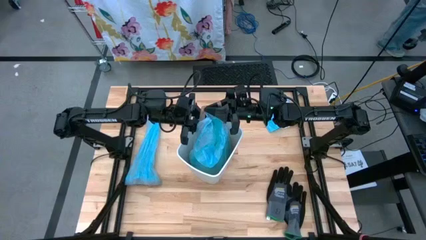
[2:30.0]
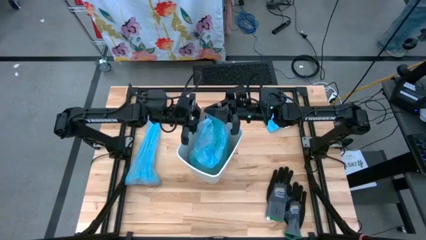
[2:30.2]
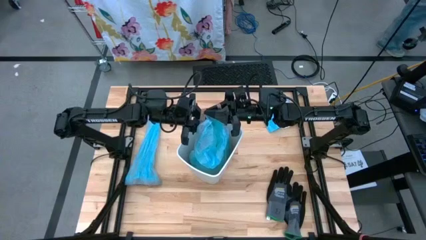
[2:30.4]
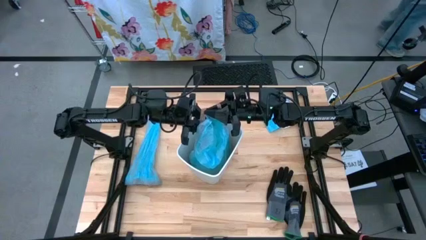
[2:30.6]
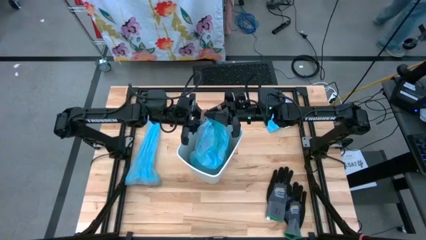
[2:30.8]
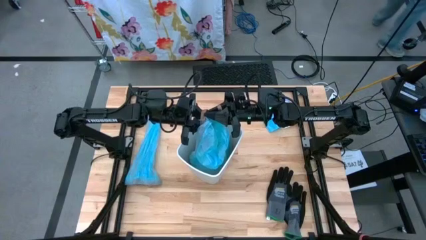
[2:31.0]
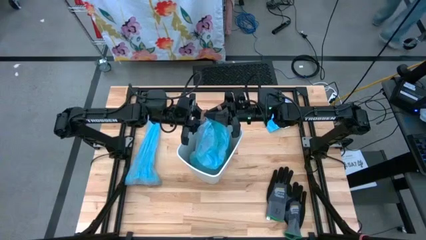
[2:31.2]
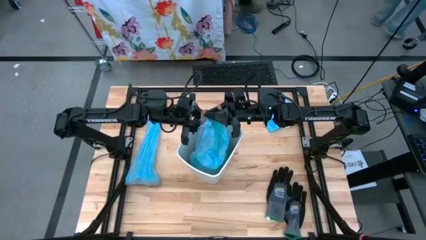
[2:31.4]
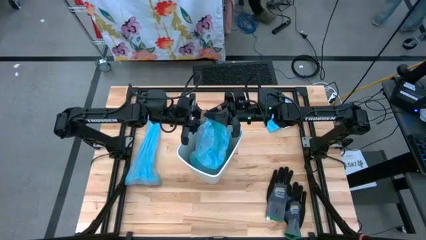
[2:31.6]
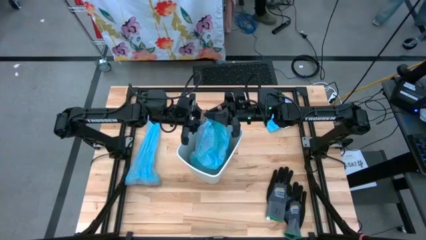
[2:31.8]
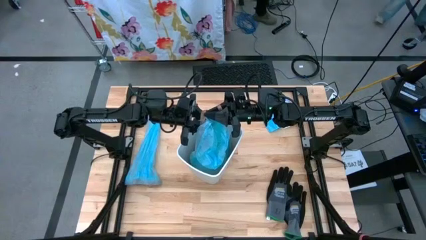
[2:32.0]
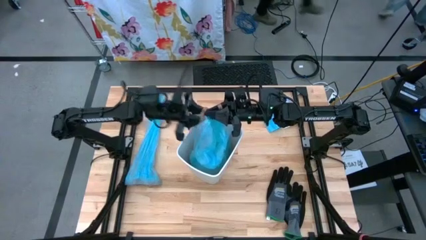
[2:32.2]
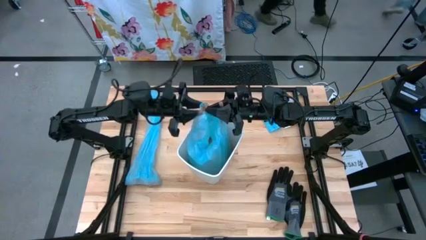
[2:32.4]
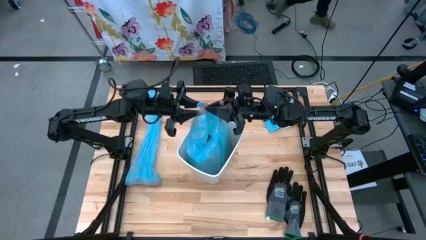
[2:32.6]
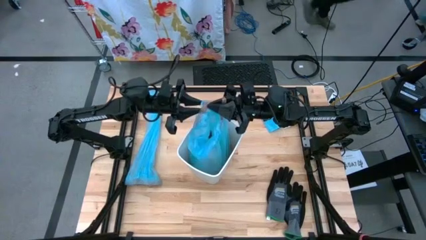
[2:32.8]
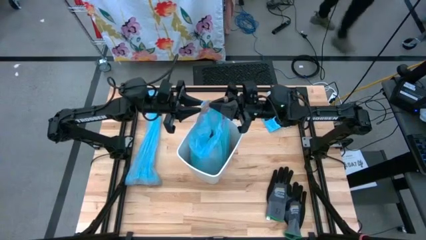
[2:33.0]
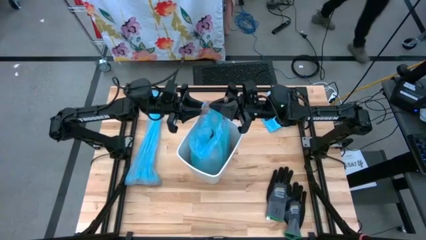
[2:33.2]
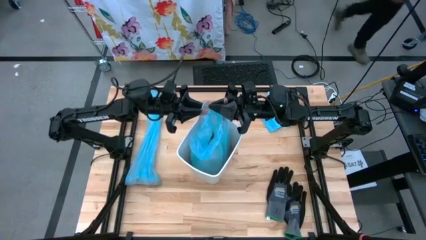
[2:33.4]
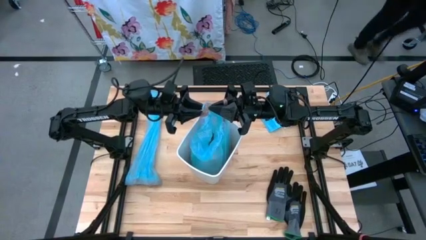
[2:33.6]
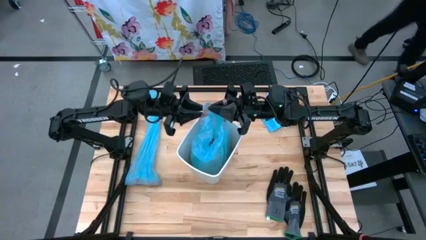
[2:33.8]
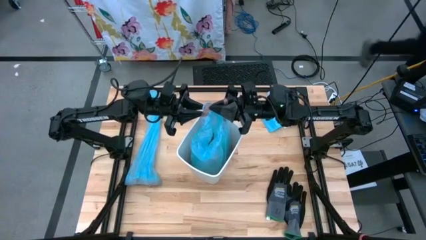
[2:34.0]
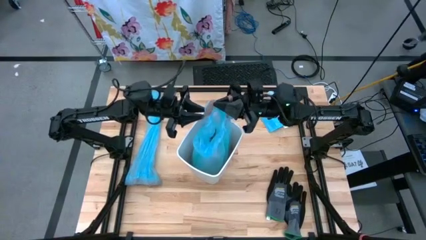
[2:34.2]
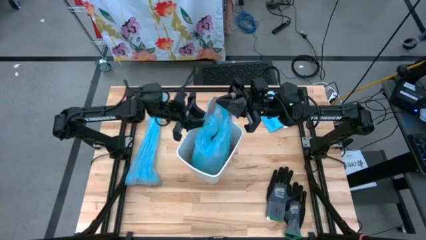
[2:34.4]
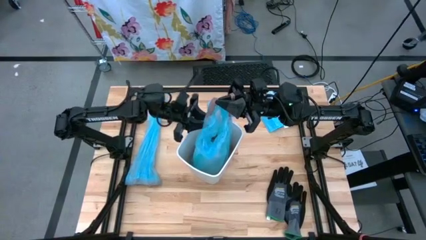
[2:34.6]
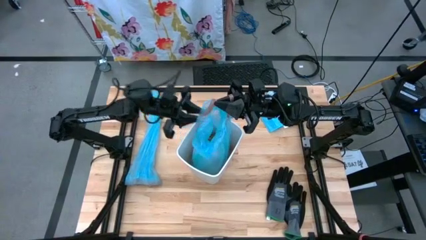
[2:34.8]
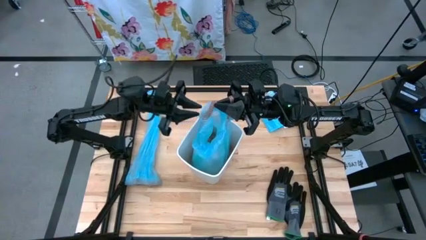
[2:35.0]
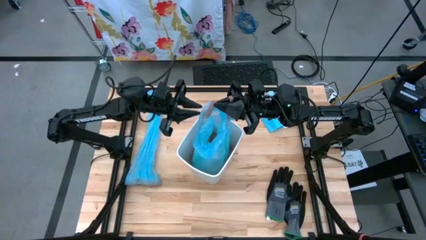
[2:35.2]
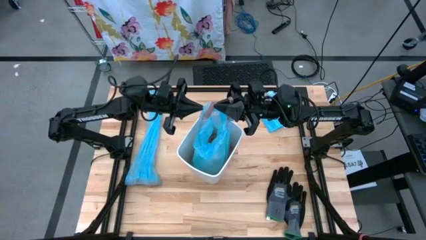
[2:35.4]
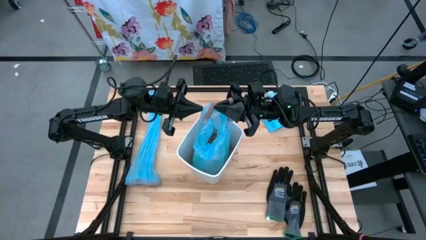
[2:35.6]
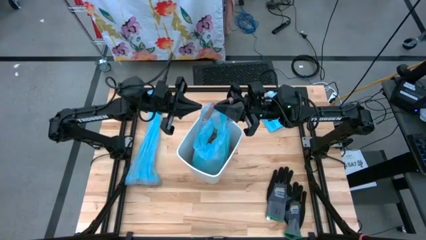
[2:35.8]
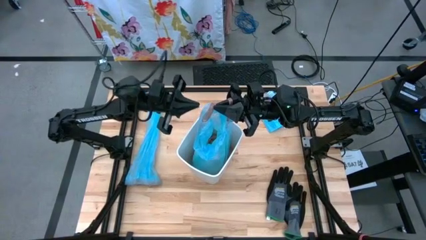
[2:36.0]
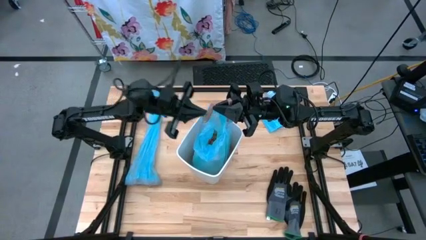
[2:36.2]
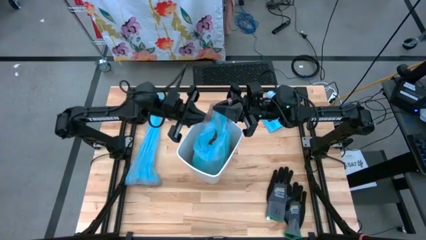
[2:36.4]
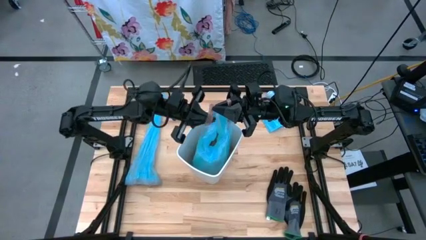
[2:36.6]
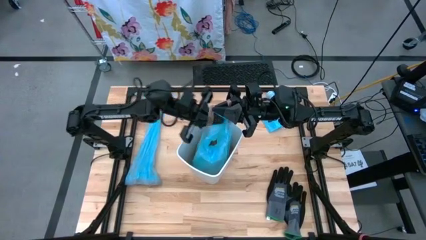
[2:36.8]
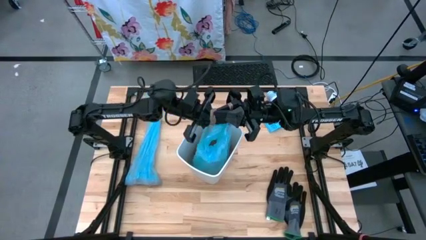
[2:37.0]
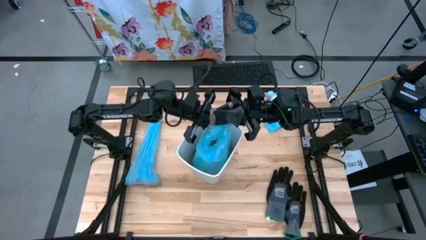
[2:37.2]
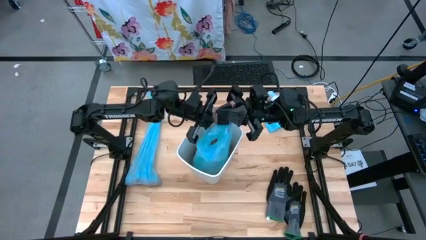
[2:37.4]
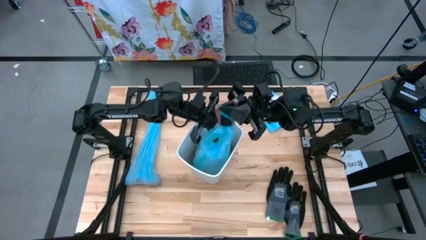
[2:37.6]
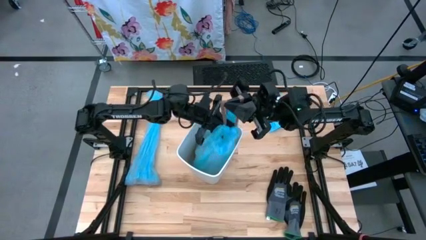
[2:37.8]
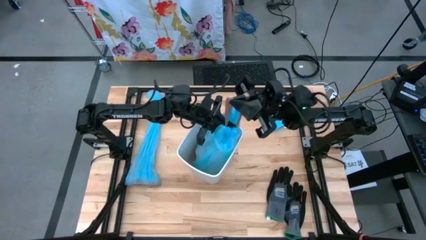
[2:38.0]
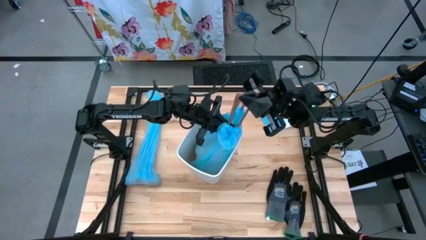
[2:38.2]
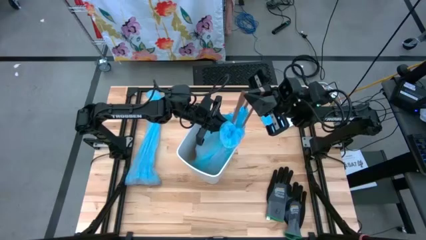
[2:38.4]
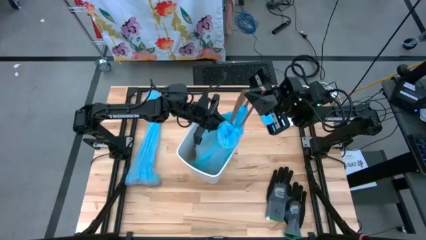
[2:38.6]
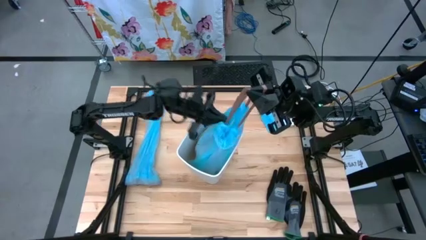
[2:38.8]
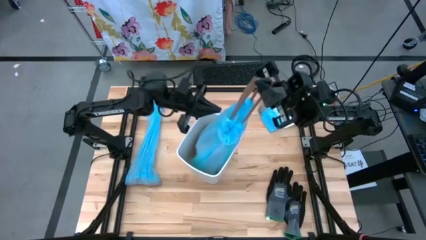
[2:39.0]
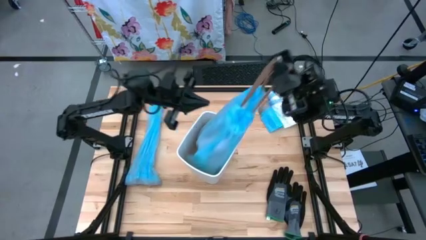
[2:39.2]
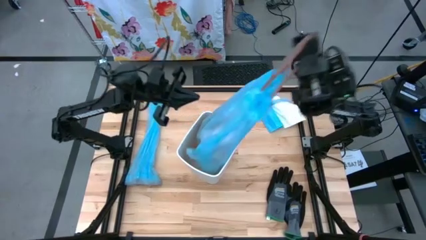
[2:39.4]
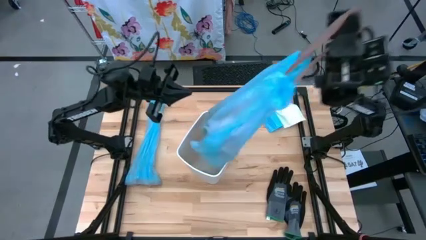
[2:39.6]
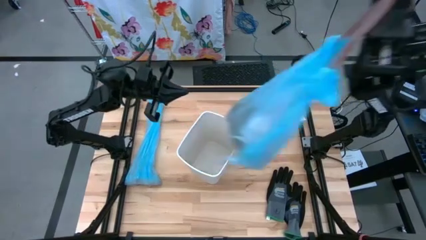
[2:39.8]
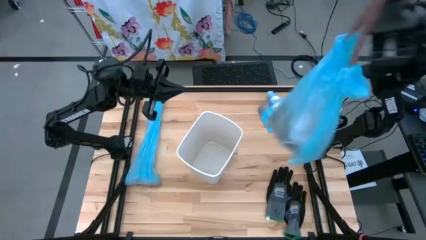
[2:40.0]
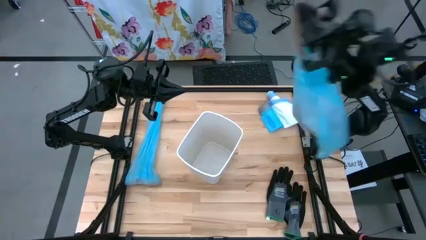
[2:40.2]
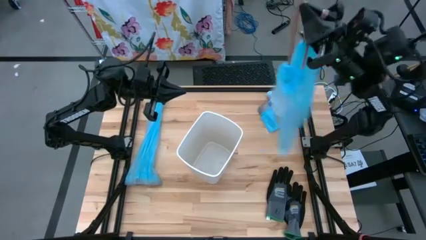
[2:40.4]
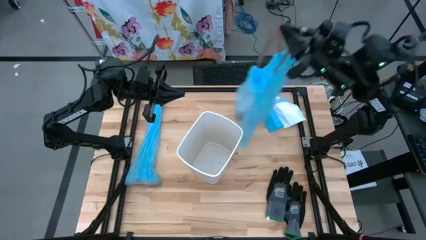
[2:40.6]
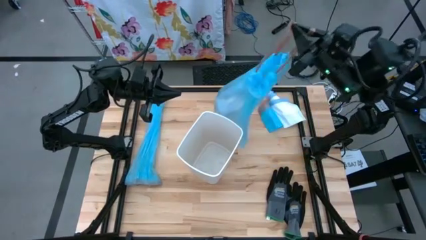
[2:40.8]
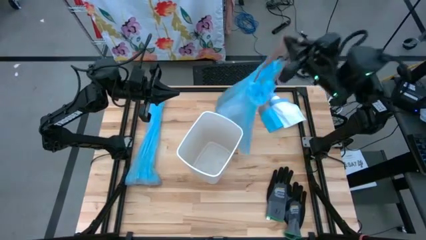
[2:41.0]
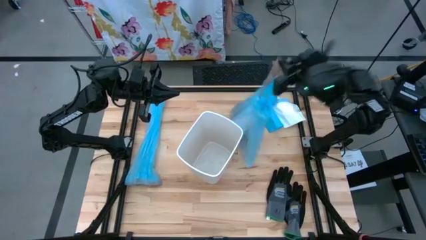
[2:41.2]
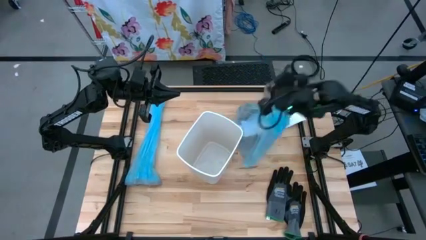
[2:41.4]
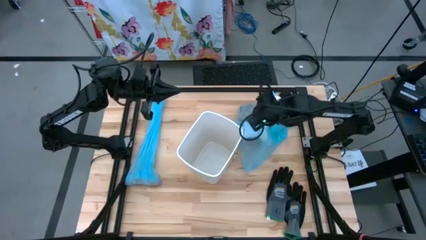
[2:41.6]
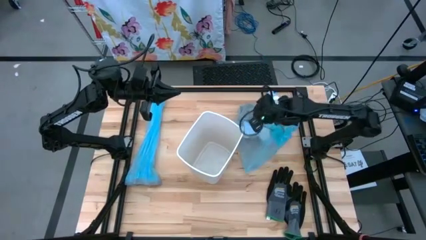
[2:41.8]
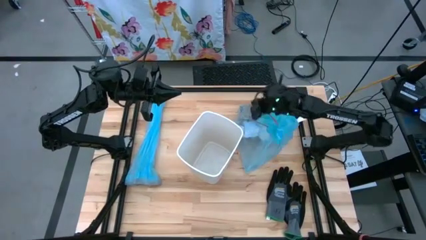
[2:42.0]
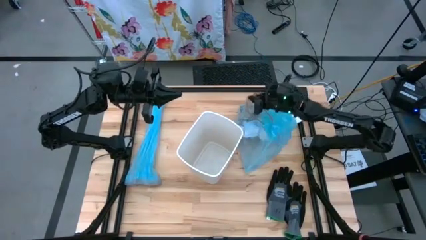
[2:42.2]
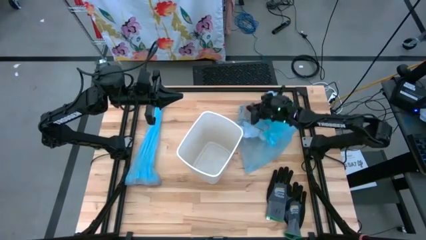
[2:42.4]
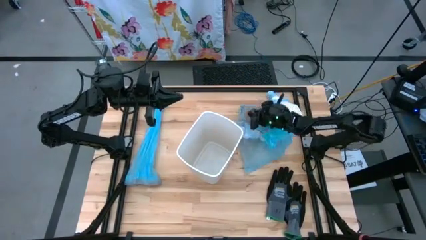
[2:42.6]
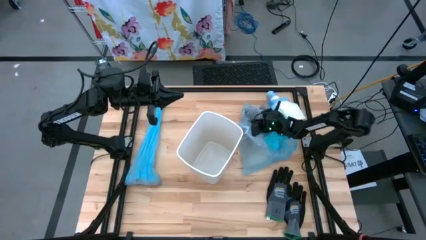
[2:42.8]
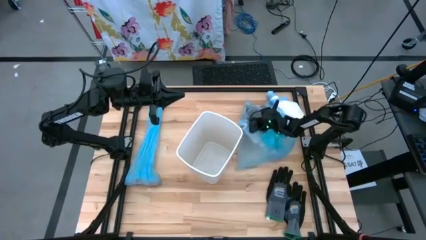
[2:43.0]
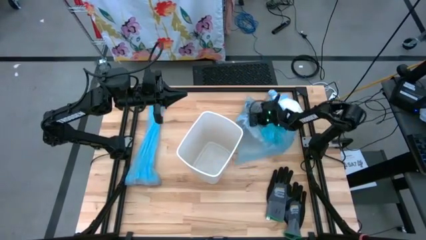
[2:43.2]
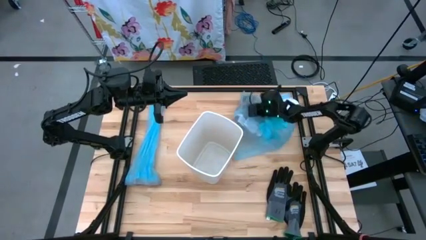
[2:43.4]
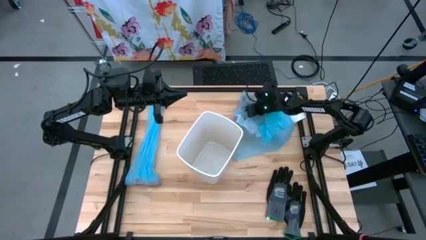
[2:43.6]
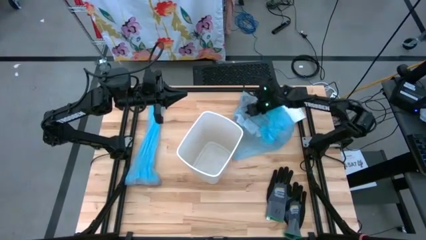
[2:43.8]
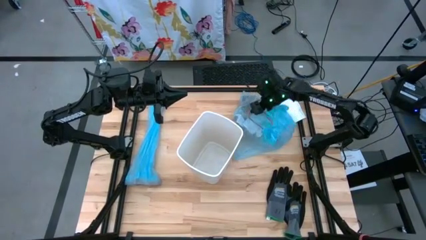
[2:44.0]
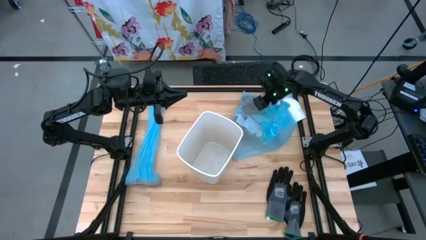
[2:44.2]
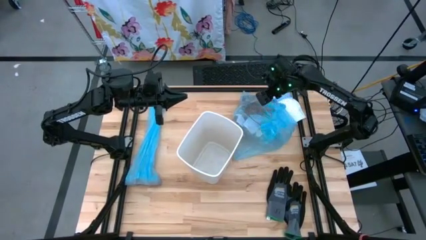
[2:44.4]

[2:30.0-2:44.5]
Task: place trash/remove bag and relplace
Remove the blue trash bag from the white trash bin

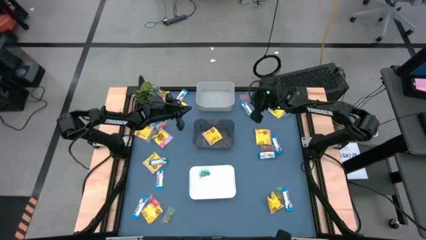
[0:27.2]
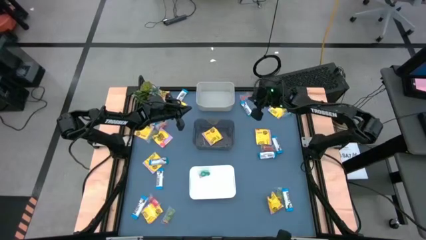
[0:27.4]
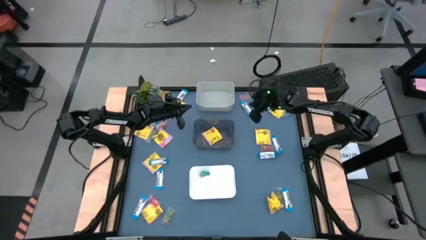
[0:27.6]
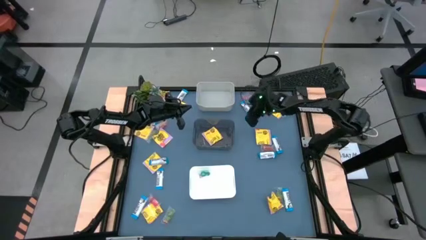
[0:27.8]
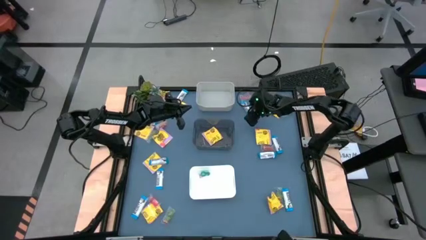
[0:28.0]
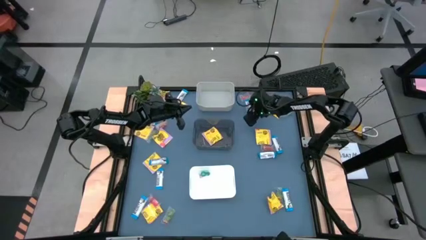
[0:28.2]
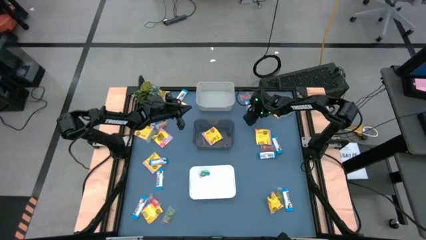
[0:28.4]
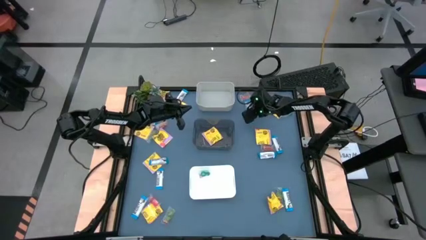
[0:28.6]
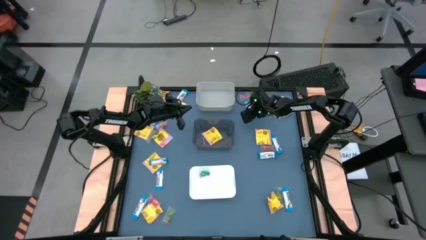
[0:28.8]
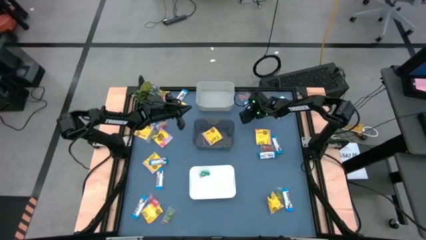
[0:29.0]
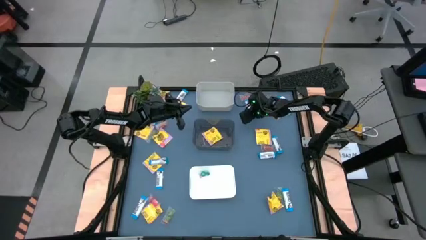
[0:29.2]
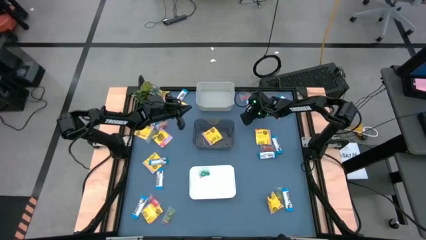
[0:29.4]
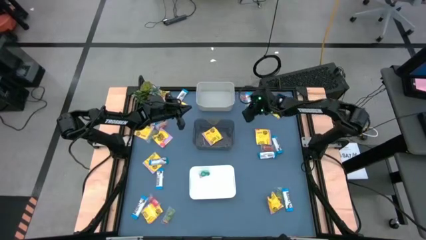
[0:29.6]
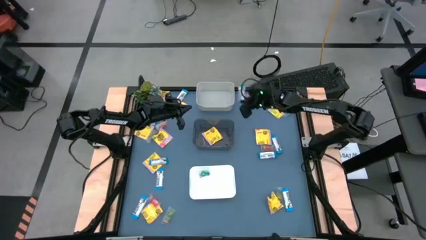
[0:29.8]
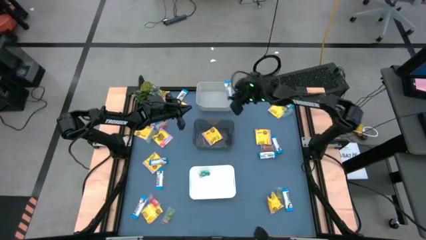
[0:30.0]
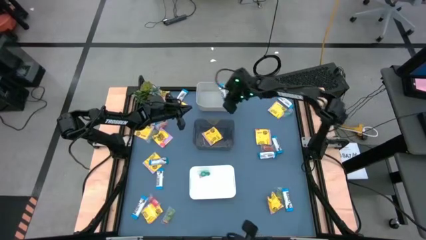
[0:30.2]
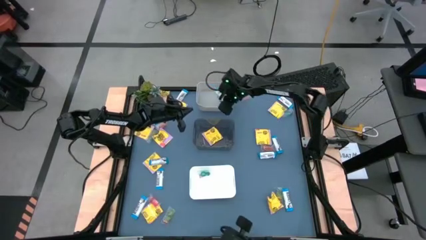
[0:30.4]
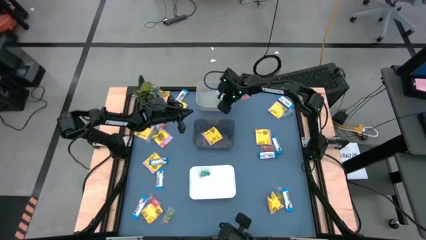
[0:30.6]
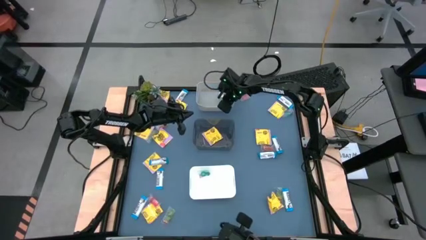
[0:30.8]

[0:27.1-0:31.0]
Task: Sort candy
Put the chocolate bar into the gray bin
